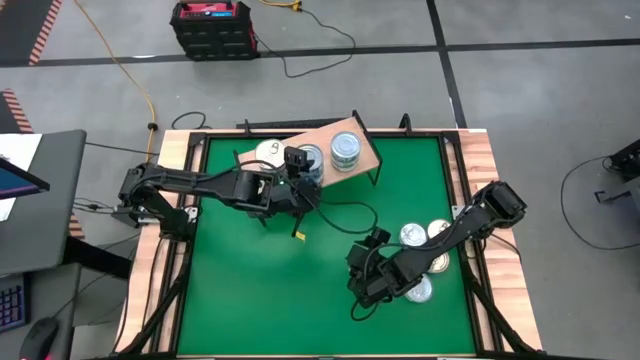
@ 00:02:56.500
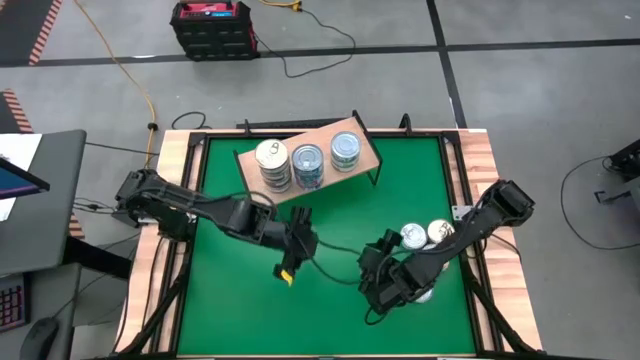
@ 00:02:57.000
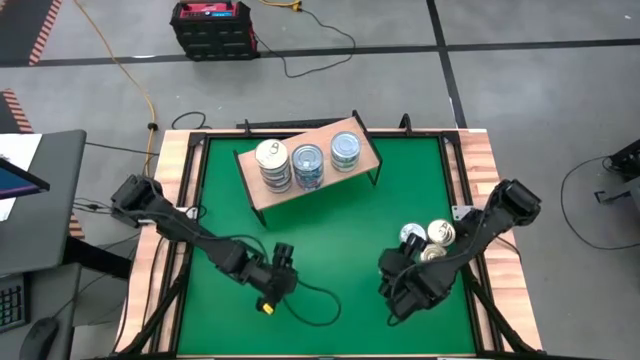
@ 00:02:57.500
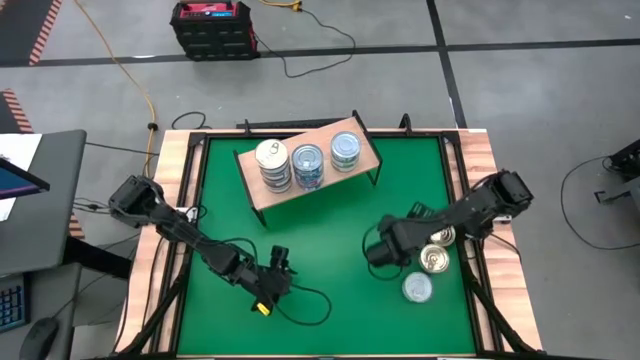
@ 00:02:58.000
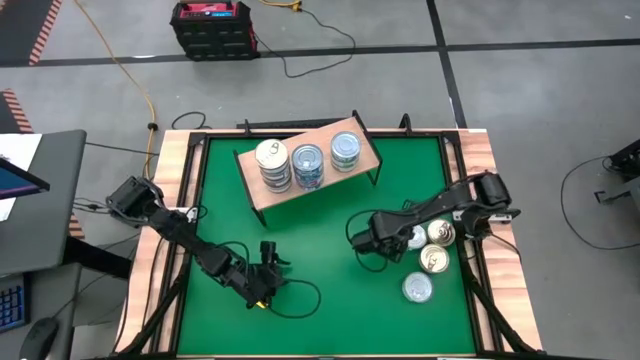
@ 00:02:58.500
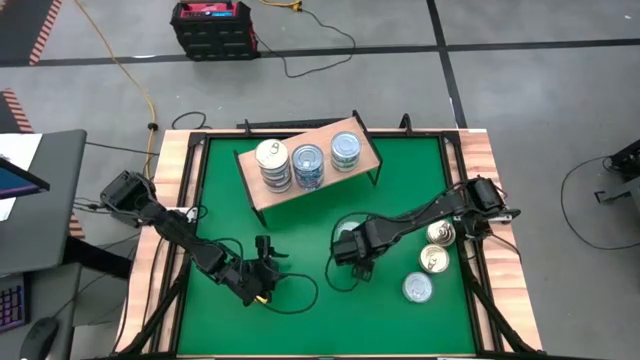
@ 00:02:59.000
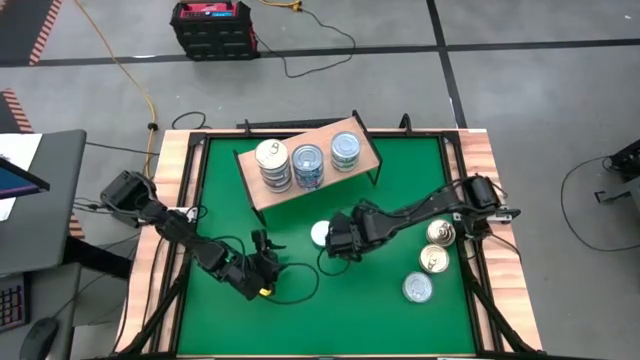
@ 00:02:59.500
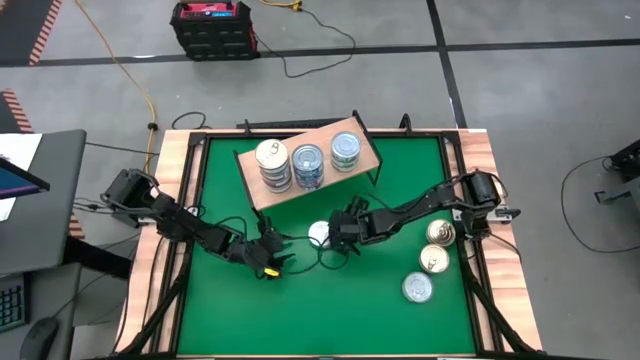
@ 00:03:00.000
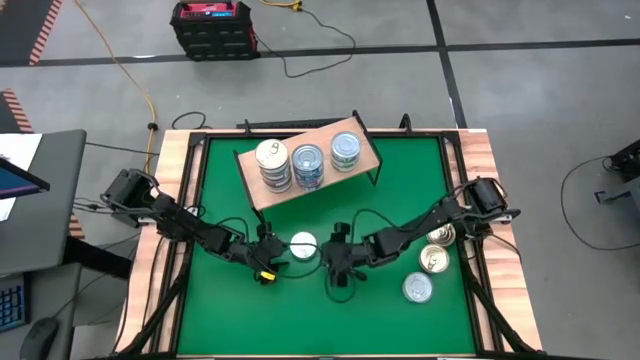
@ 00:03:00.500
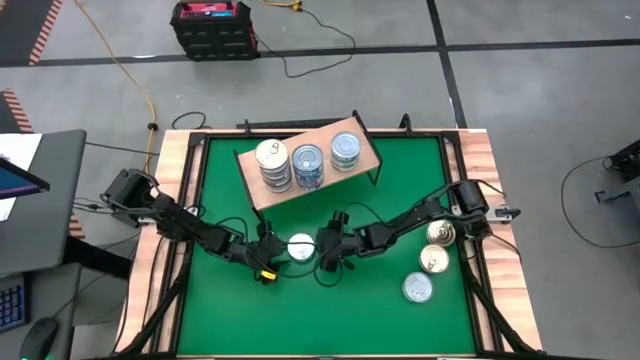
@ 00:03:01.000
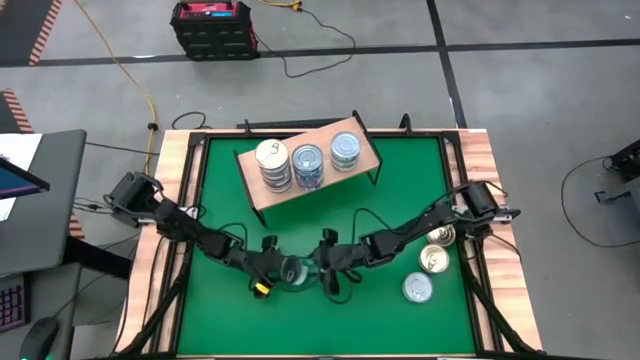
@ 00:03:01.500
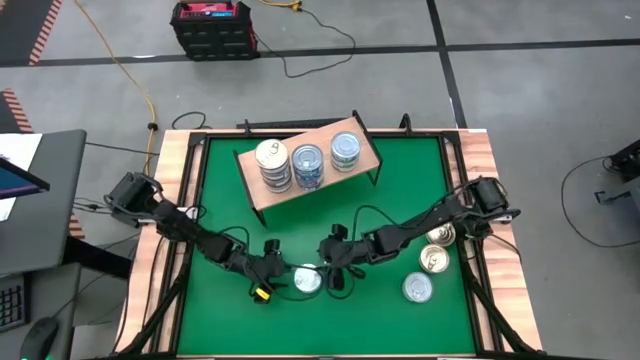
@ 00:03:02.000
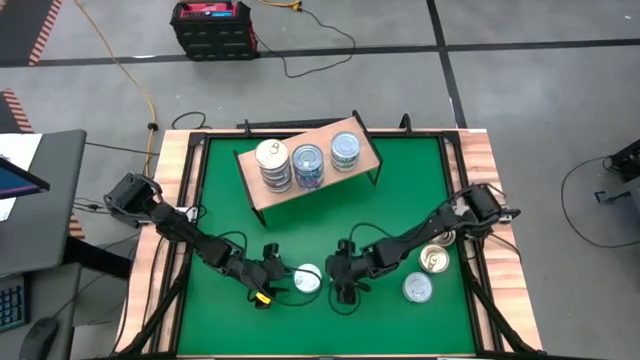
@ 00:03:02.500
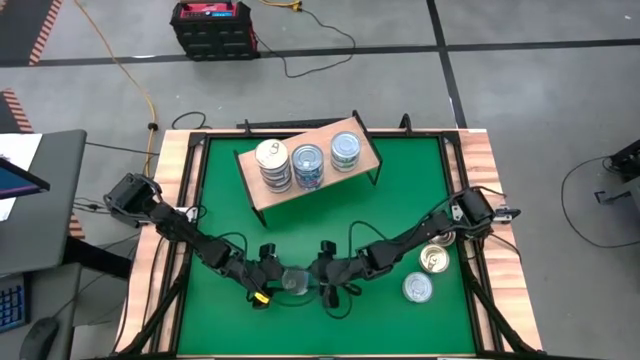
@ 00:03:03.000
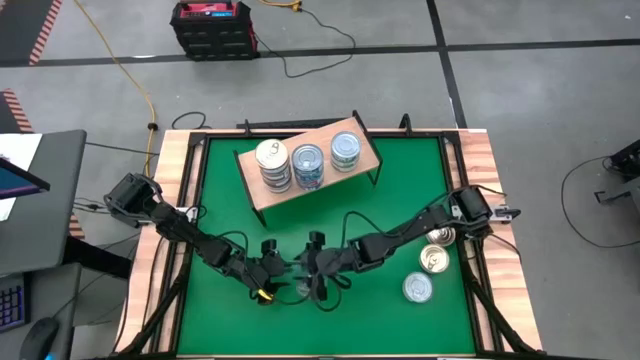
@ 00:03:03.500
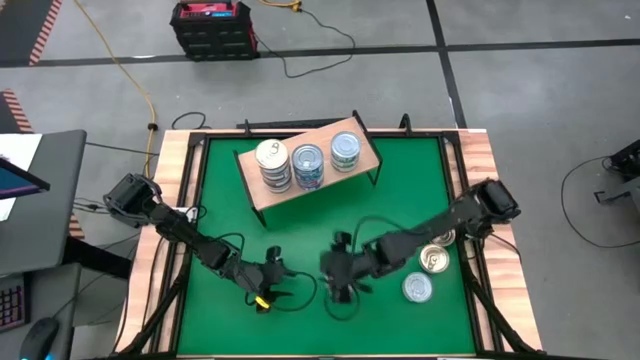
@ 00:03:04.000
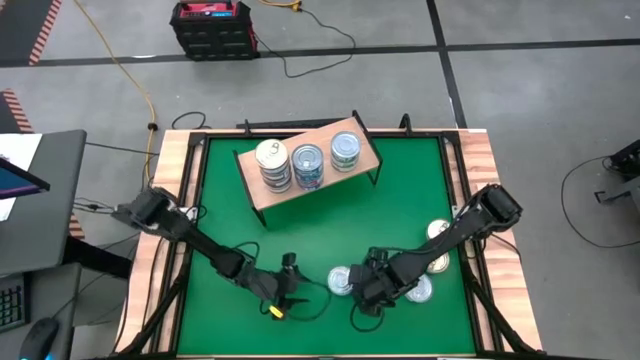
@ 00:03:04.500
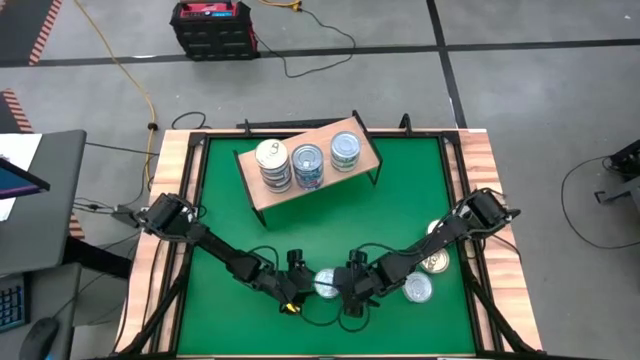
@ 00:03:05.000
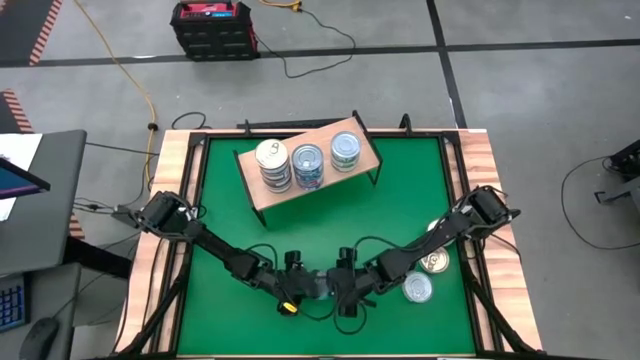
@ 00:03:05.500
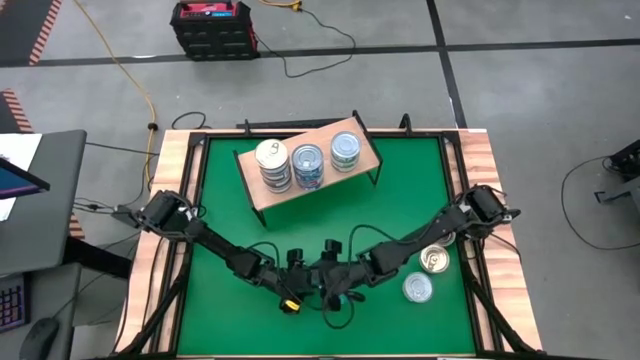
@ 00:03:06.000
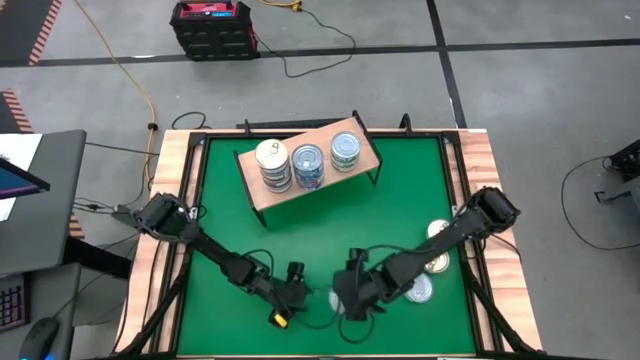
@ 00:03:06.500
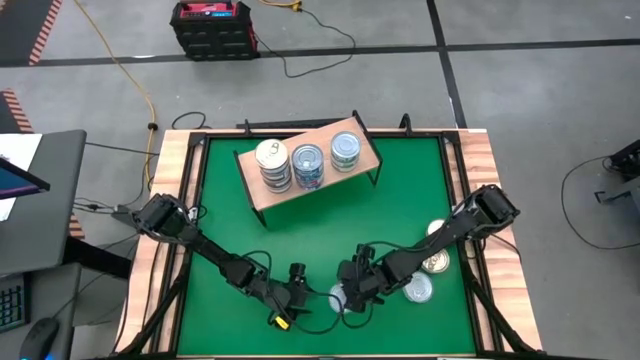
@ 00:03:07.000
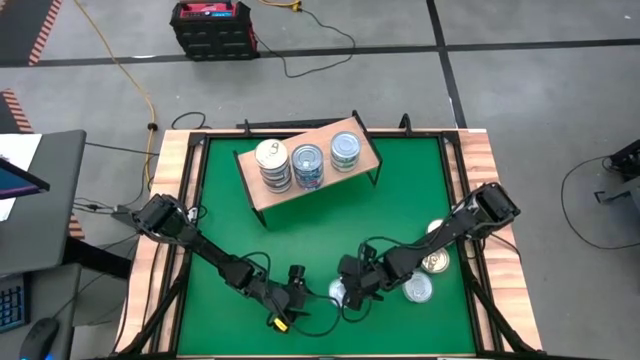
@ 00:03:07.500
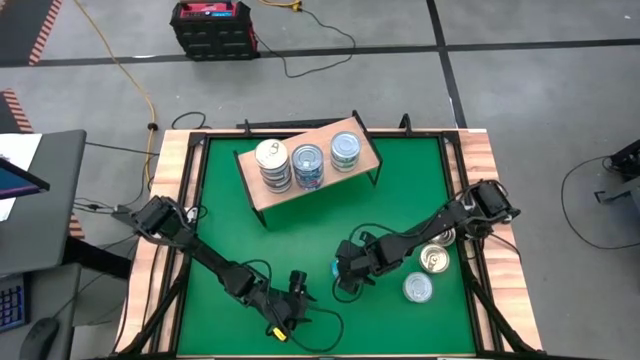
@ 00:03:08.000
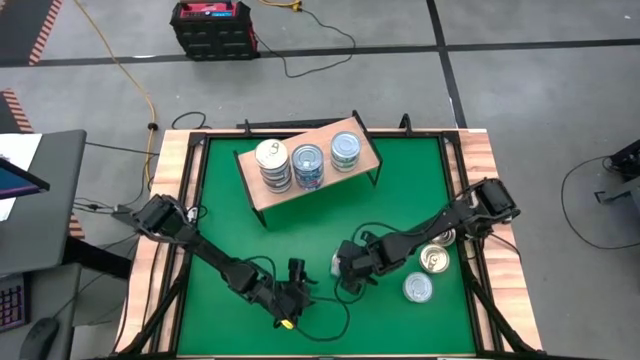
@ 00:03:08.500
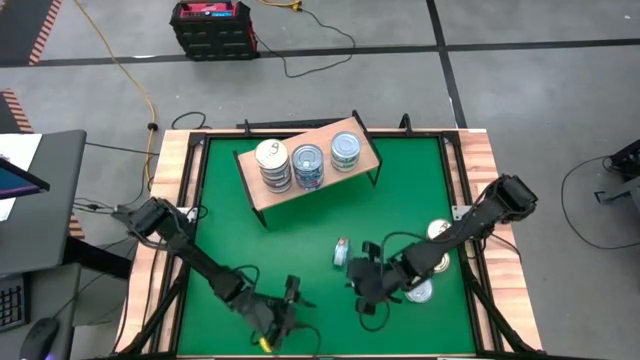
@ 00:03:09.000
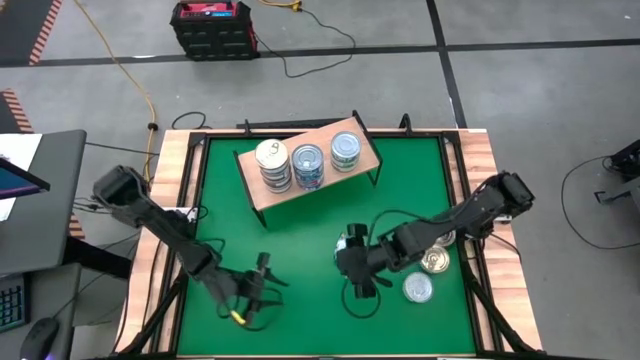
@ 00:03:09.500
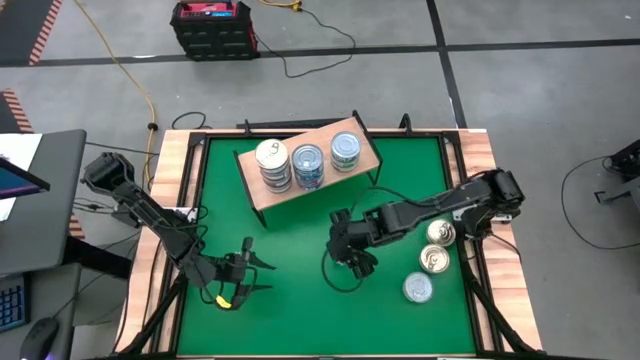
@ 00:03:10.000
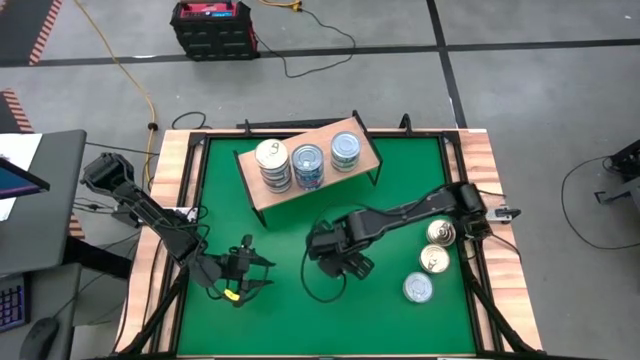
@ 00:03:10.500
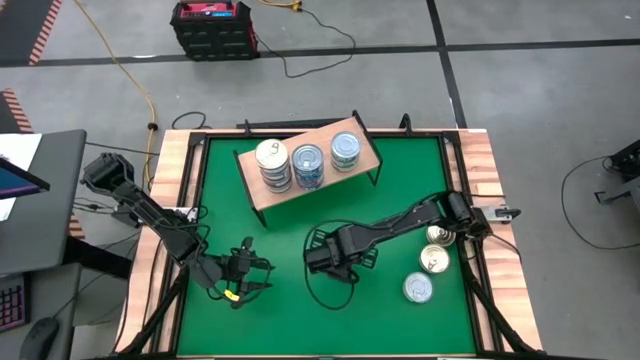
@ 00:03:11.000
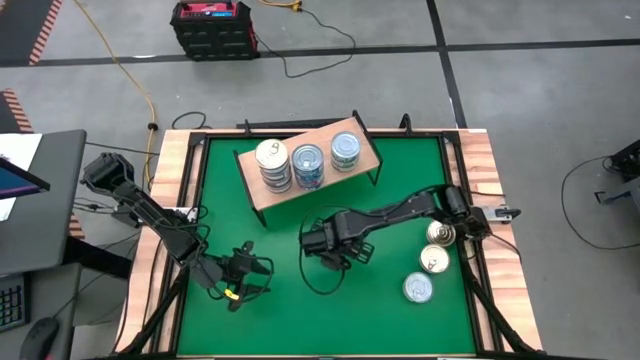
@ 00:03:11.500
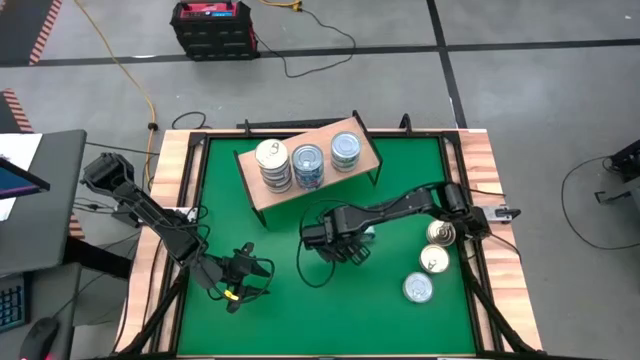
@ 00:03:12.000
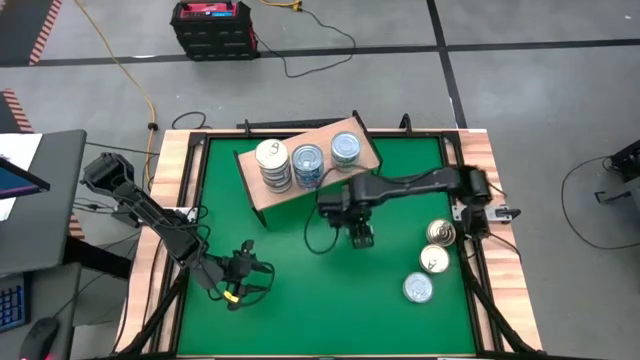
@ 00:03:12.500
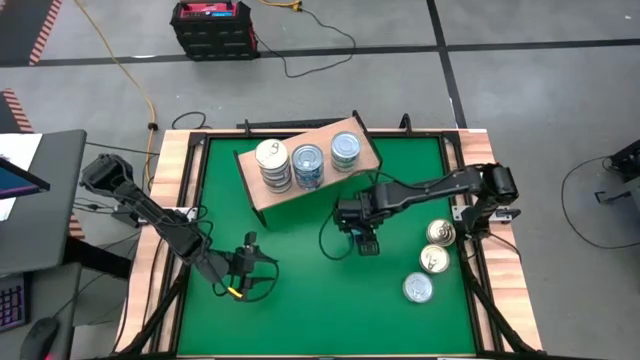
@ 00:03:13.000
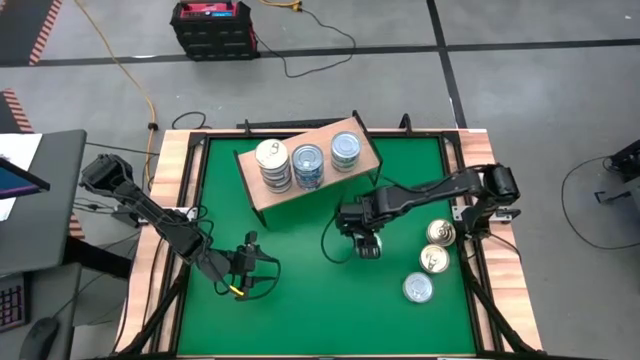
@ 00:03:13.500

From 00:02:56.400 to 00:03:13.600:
Task: Stack canned seafood by type on shelf
Stack the yellow blue tuna can on top of the blue tuna can on the shelf

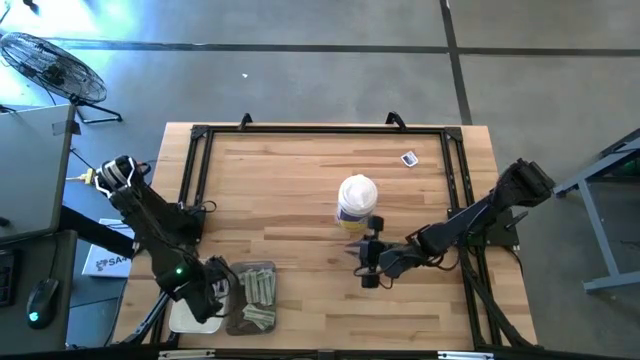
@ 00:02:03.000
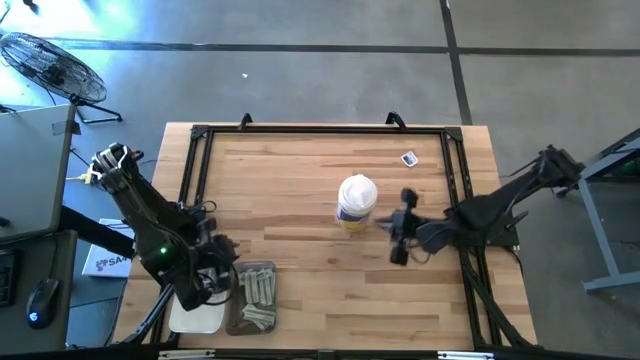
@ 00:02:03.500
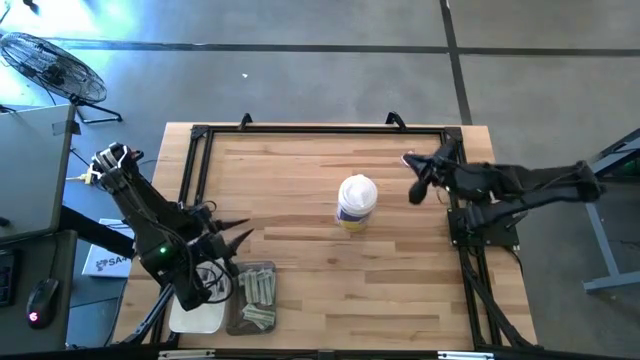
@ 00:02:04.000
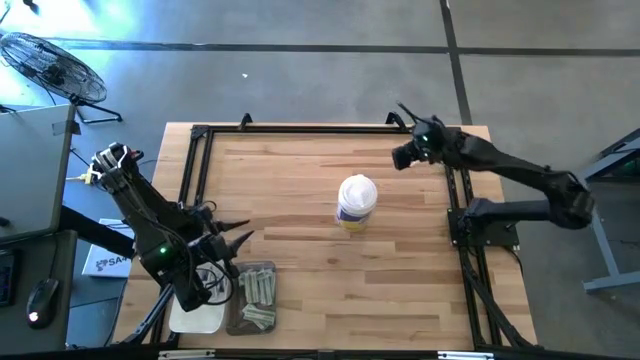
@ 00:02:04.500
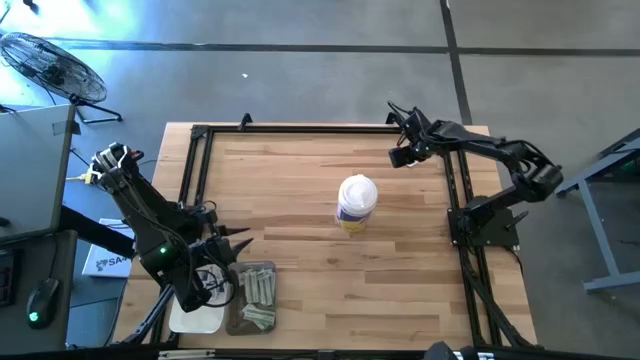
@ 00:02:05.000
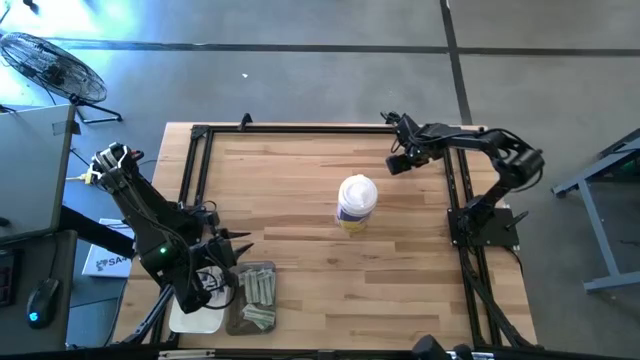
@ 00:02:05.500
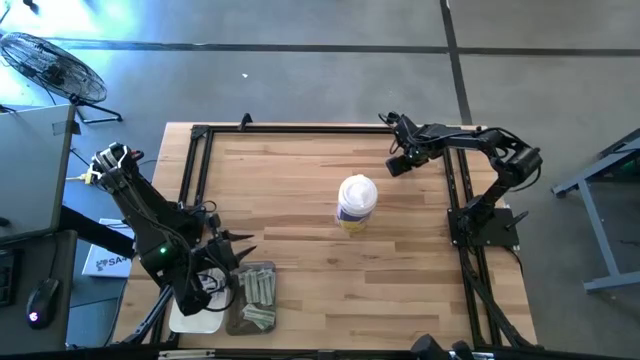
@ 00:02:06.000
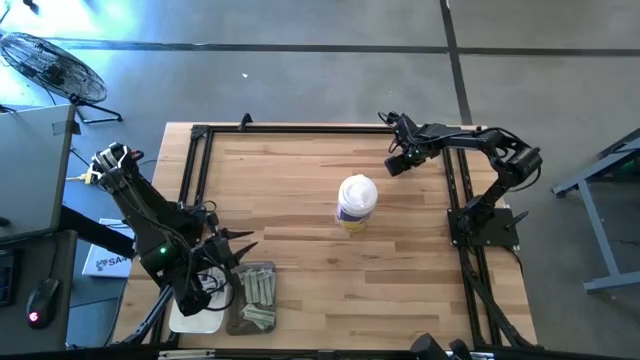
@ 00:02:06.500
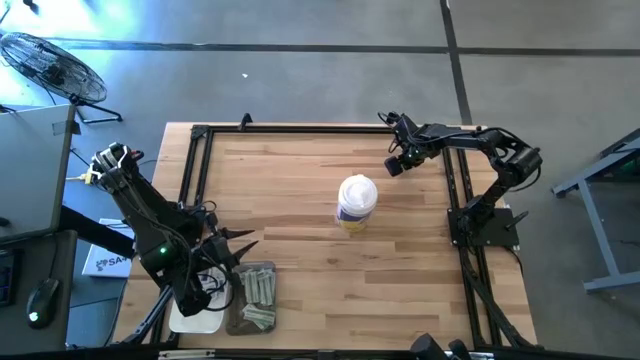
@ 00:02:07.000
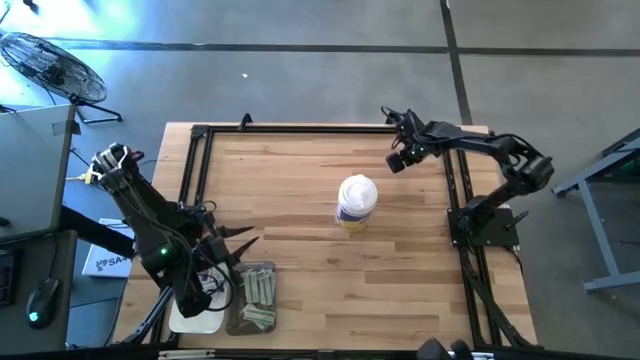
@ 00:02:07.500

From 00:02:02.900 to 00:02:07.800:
Task: Pick & Place First Aid Supplies
Put the alcohol pad into the white bin
